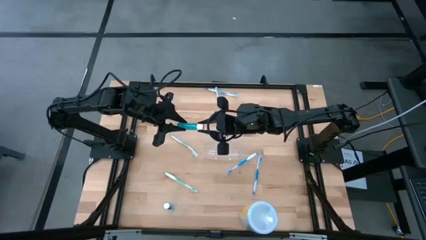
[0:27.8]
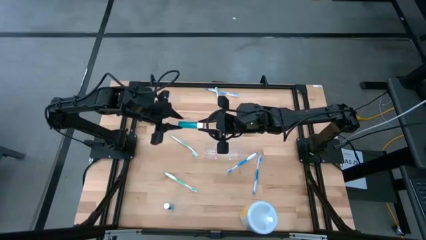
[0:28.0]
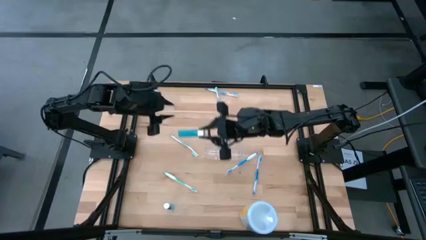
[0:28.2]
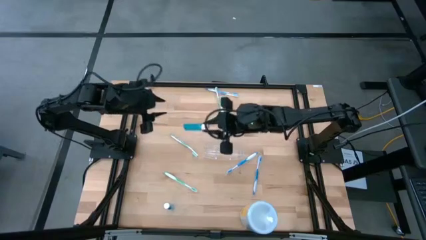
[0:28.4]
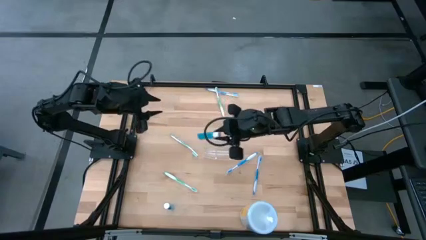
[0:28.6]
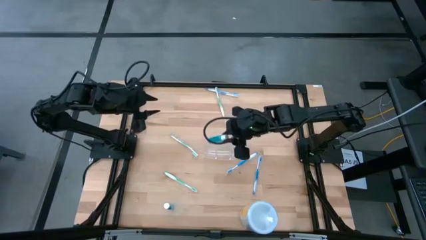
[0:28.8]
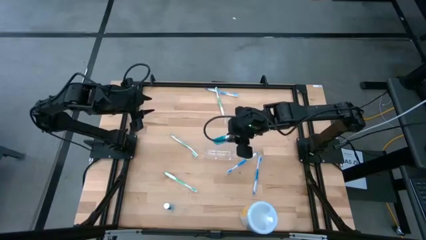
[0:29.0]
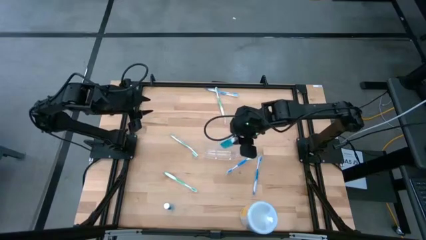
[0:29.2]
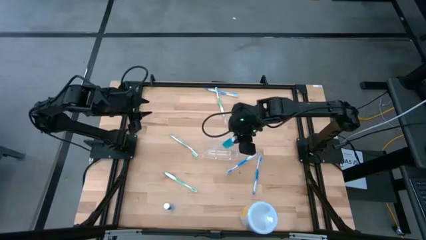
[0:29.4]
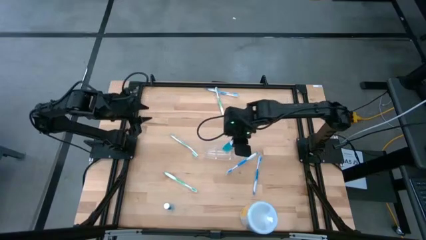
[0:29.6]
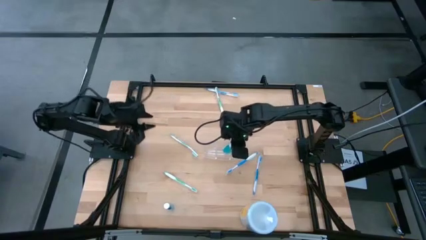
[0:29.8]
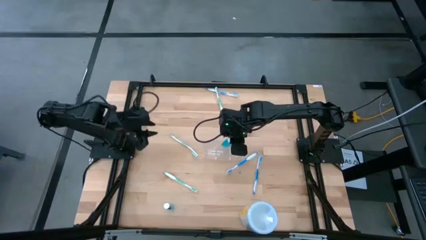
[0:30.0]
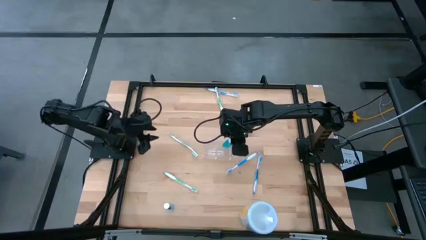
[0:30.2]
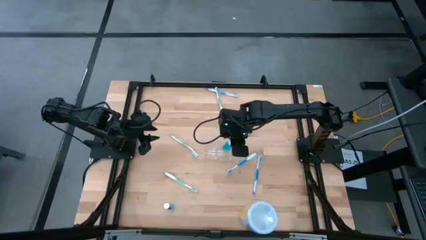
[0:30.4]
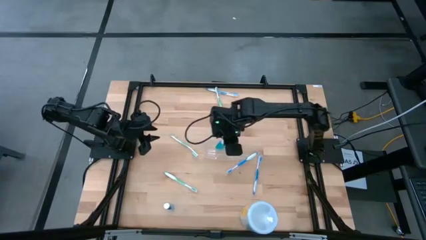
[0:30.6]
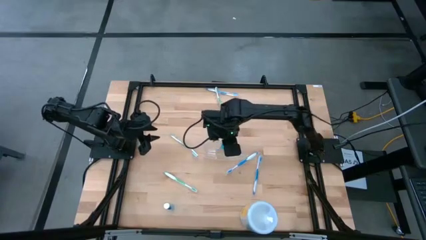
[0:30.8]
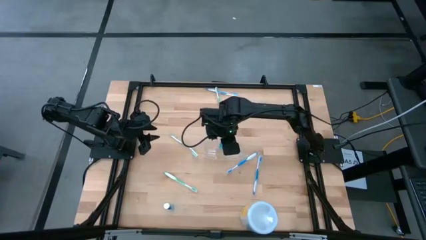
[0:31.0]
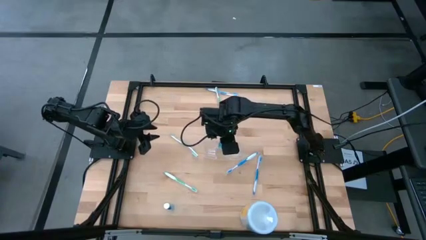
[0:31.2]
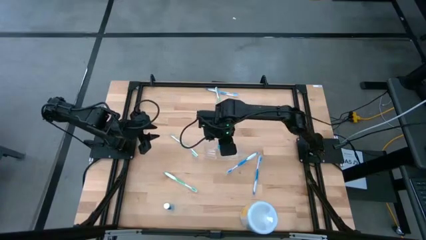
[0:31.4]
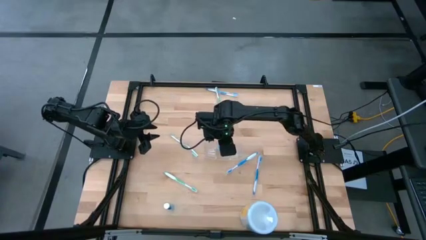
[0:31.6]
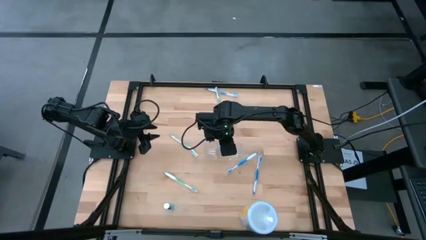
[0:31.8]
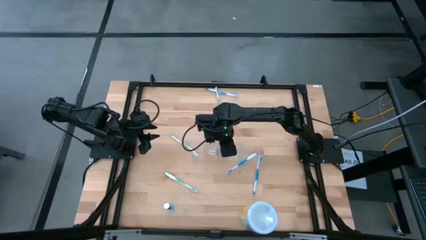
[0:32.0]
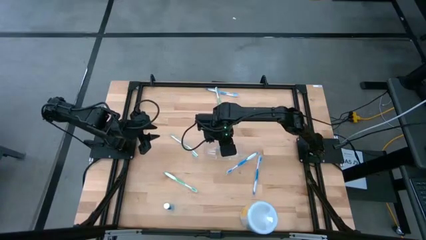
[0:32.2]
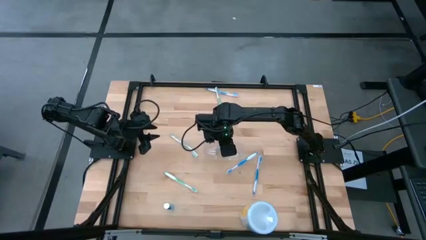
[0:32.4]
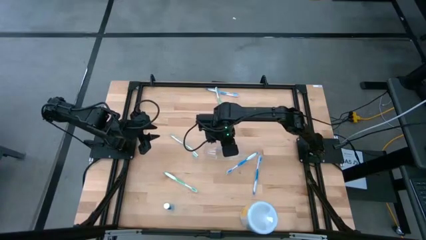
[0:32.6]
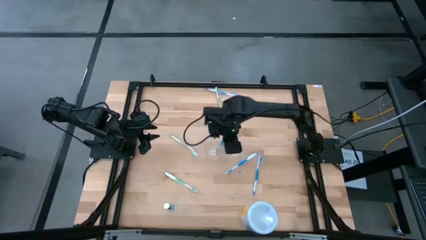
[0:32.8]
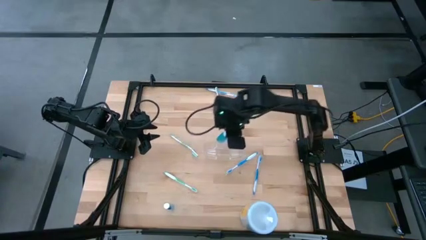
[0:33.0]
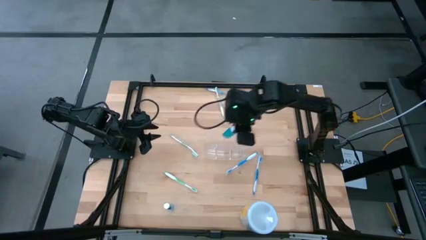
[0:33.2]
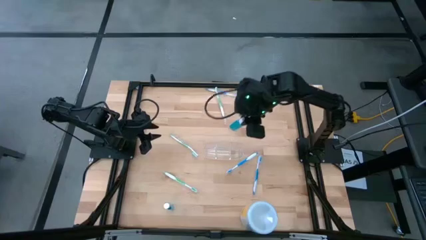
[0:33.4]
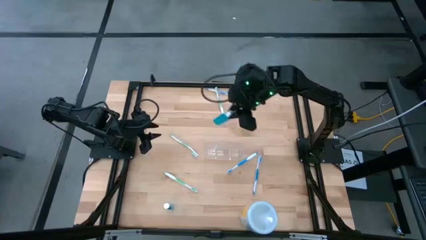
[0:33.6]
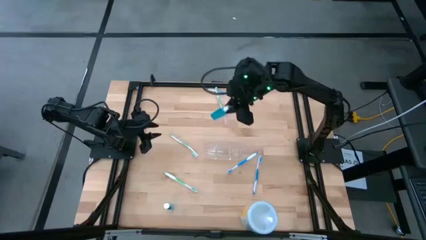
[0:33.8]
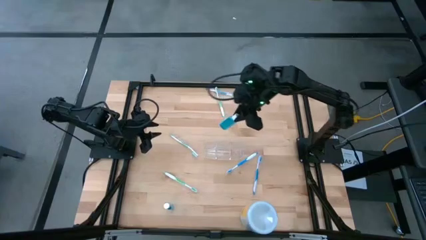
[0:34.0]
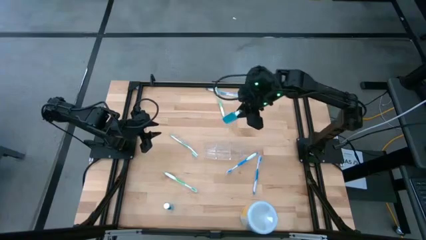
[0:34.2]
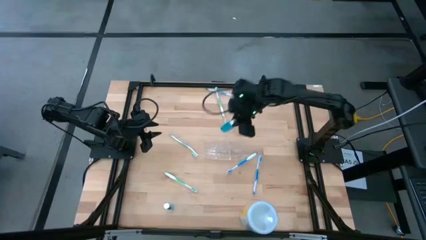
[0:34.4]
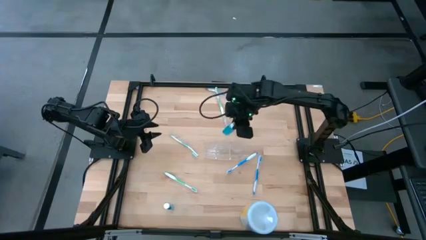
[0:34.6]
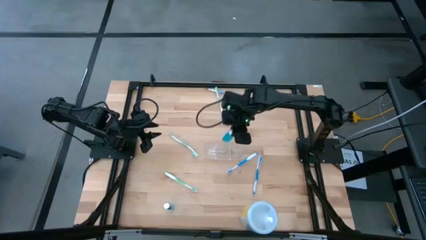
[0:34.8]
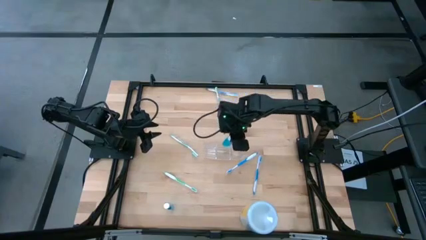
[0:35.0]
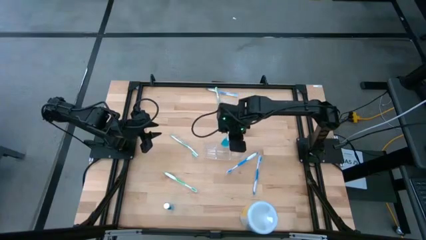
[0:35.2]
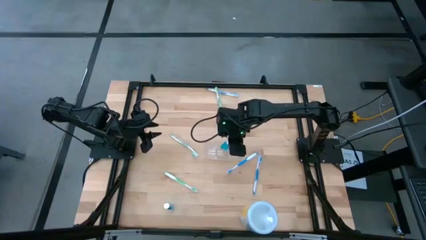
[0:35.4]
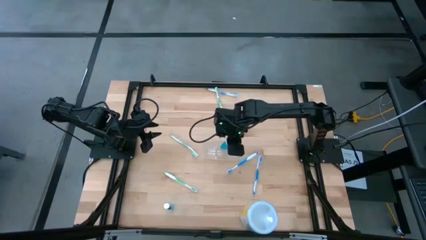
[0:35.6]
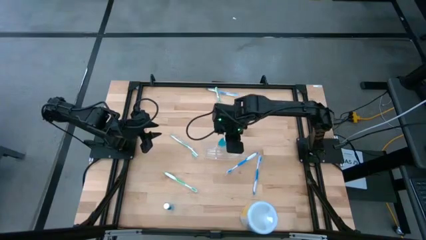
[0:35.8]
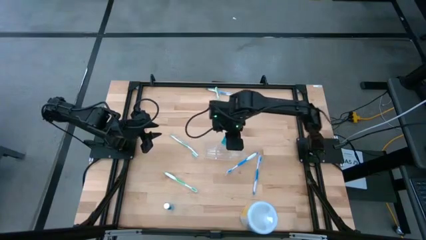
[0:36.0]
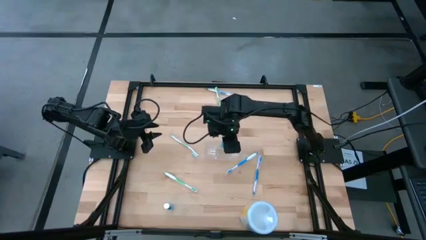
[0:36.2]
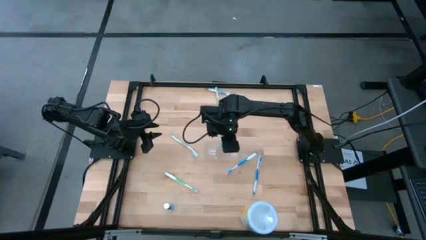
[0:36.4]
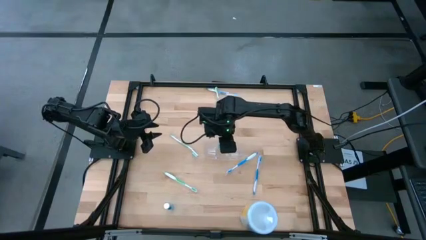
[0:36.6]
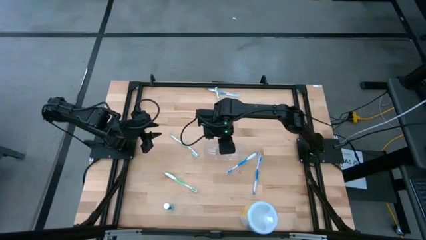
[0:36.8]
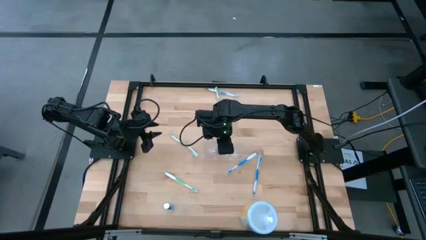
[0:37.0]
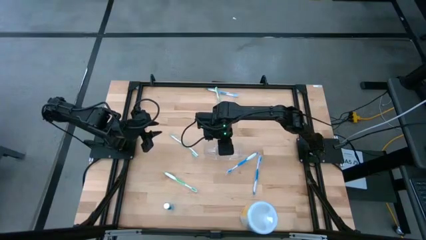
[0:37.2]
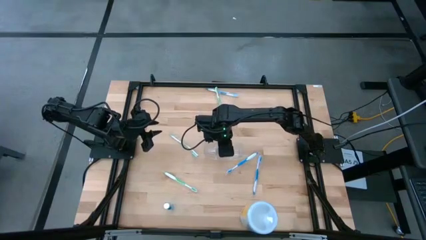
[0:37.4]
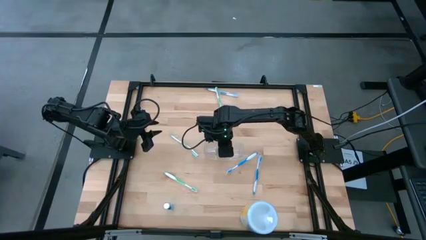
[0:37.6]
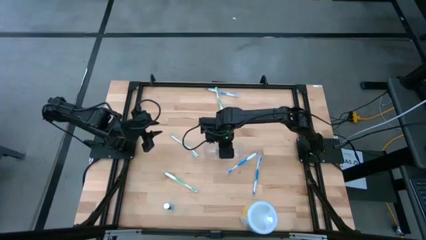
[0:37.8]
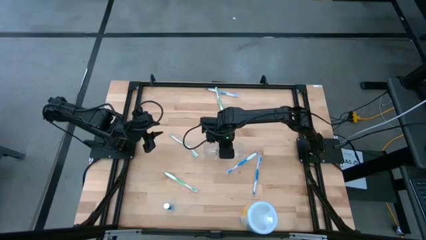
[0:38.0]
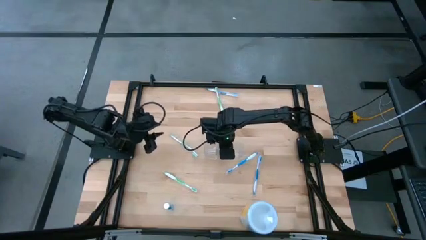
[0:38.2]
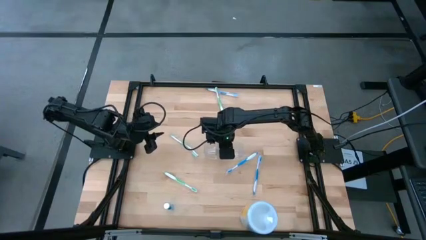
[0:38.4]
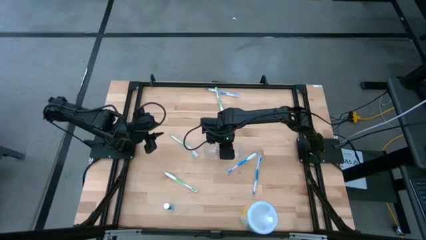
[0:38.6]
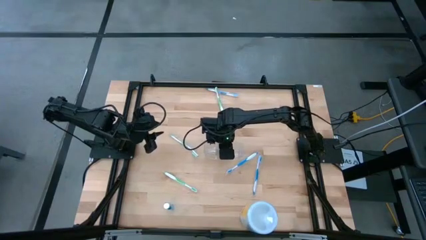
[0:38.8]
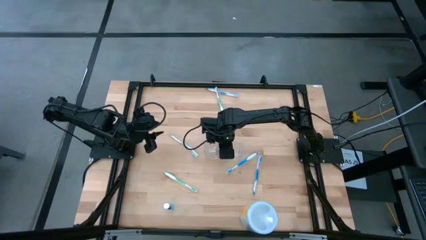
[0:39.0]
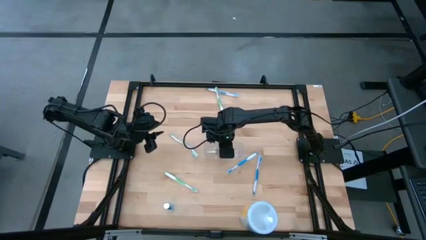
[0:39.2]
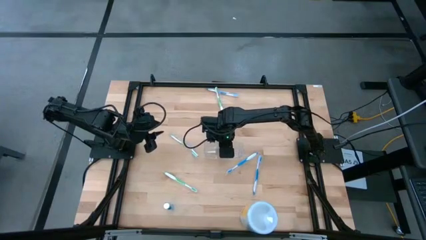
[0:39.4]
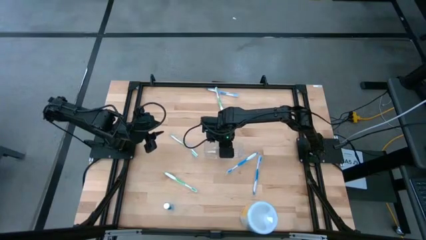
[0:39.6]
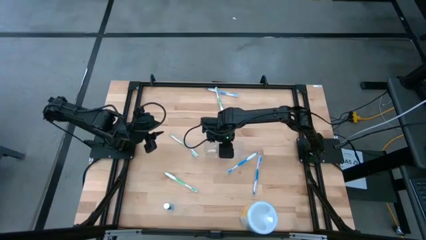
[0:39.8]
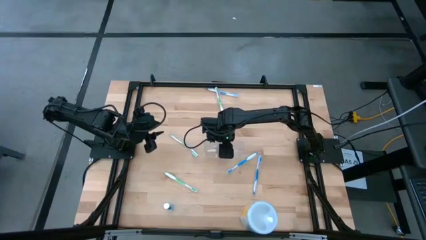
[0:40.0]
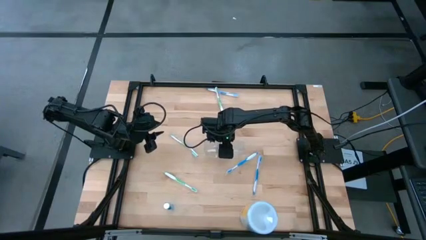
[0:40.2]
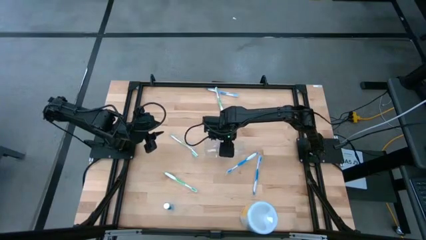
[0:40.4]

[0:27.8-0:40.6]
Task: Pick & Place toothbrushing station
Put the top blue mouthwash into the transparent organizer
